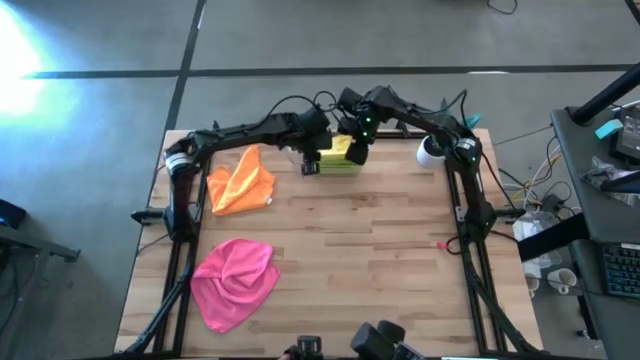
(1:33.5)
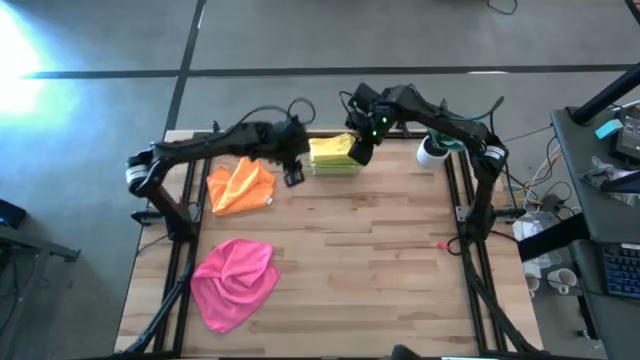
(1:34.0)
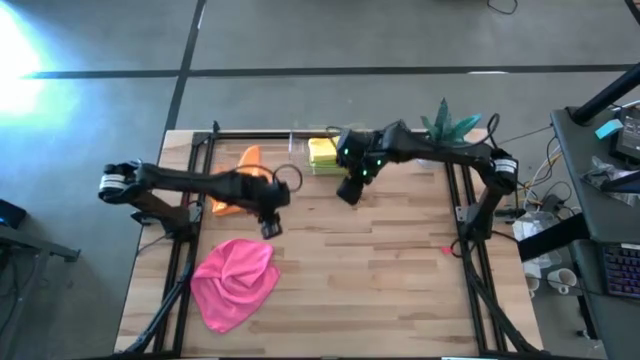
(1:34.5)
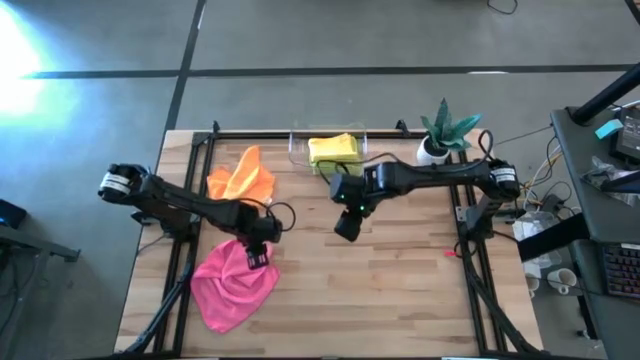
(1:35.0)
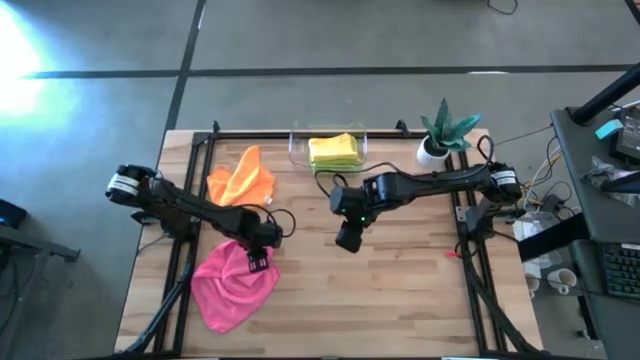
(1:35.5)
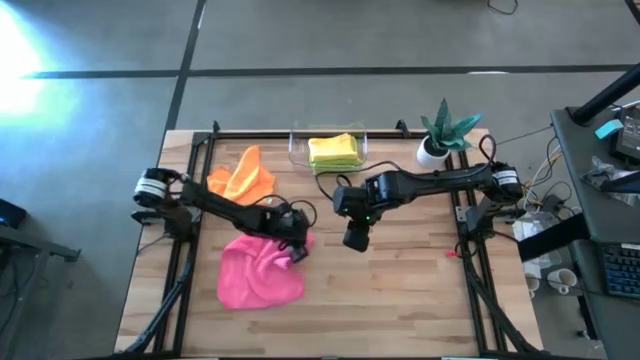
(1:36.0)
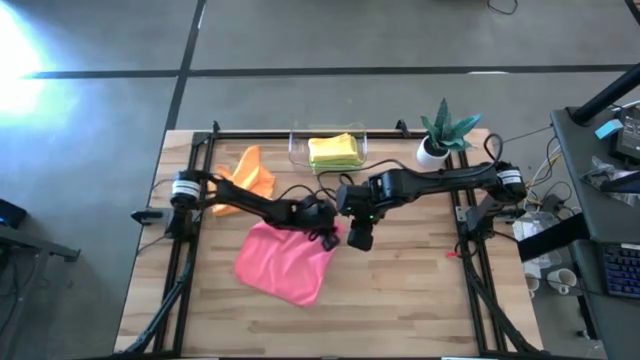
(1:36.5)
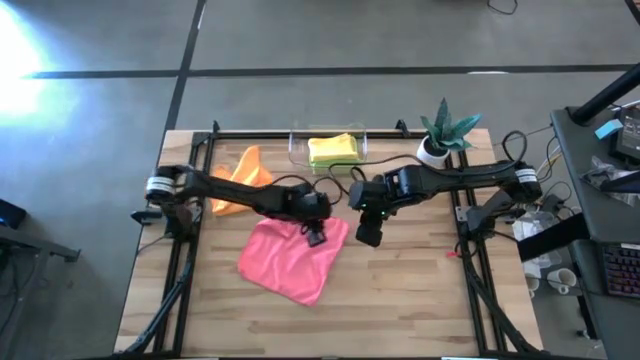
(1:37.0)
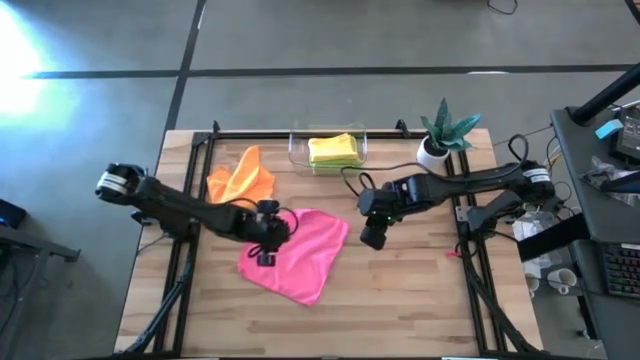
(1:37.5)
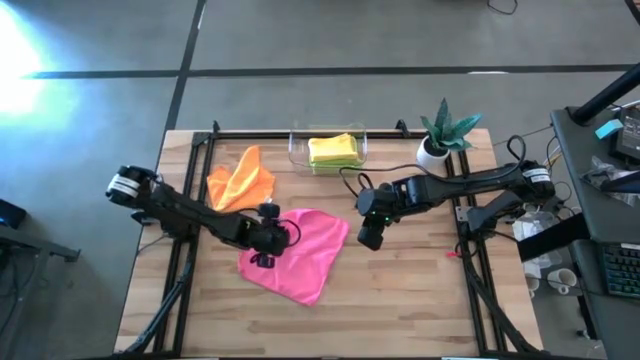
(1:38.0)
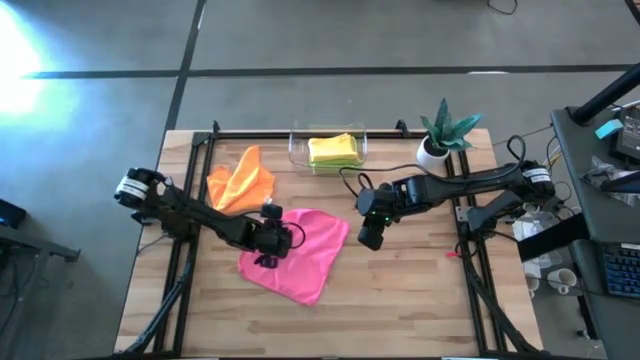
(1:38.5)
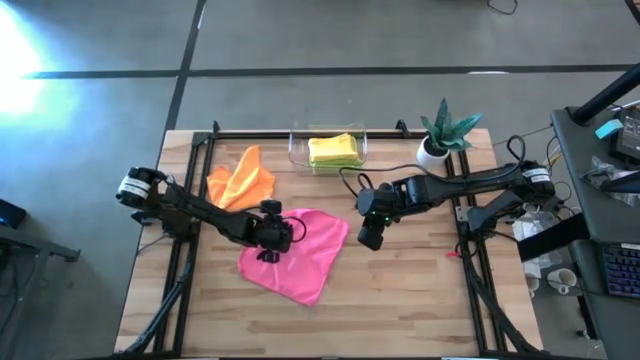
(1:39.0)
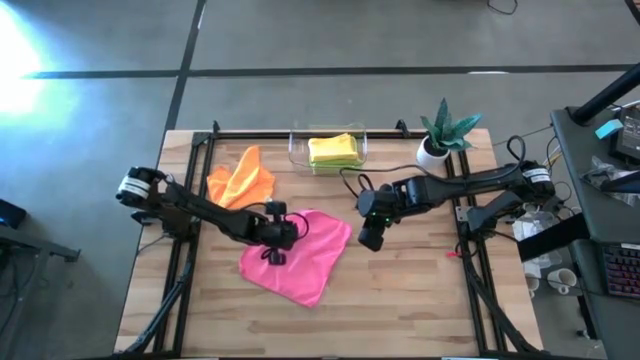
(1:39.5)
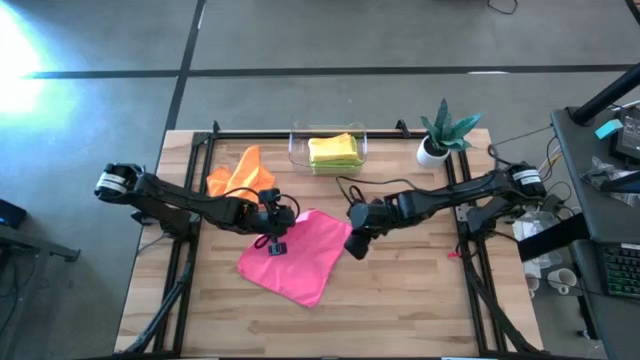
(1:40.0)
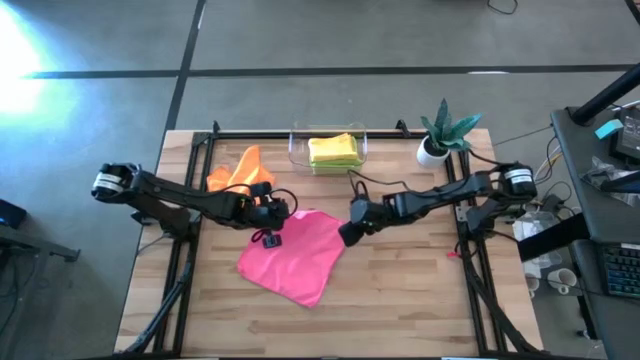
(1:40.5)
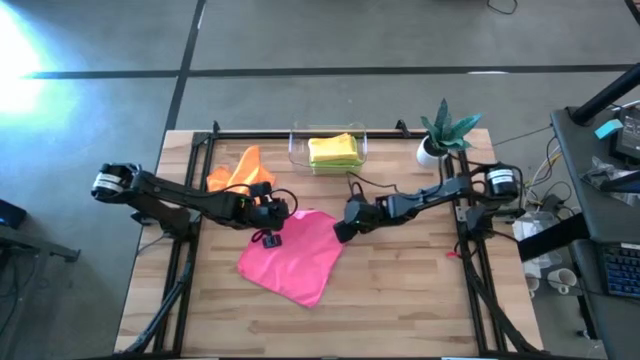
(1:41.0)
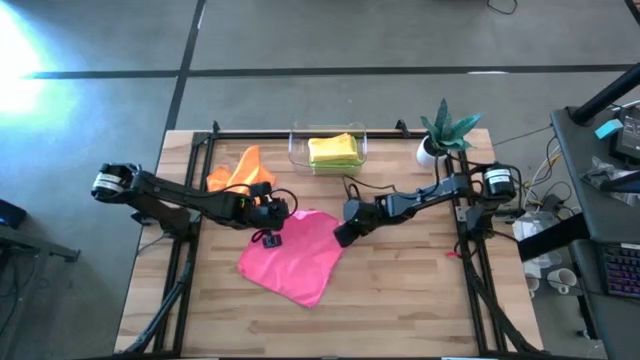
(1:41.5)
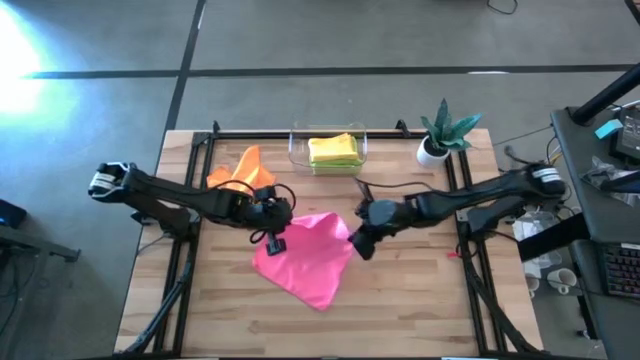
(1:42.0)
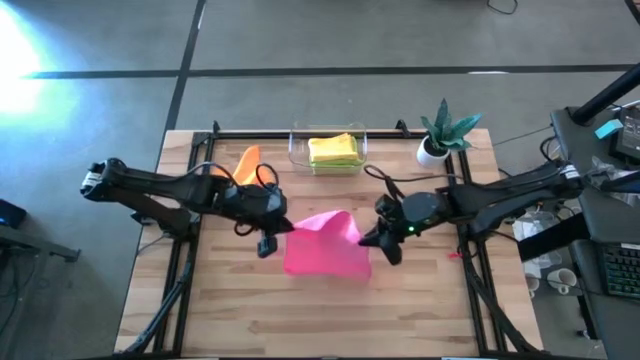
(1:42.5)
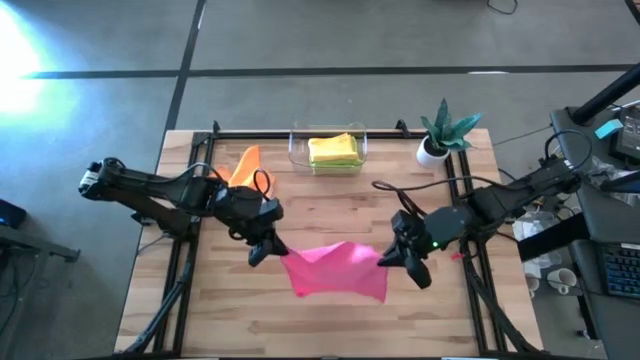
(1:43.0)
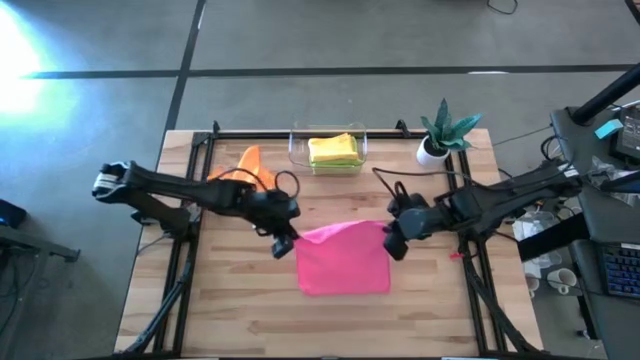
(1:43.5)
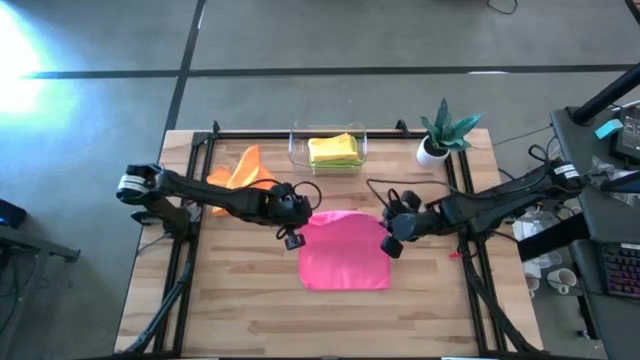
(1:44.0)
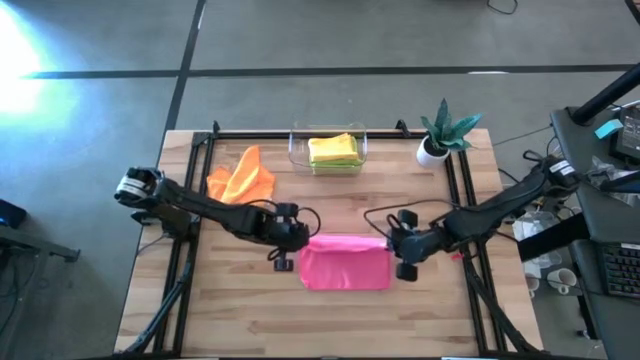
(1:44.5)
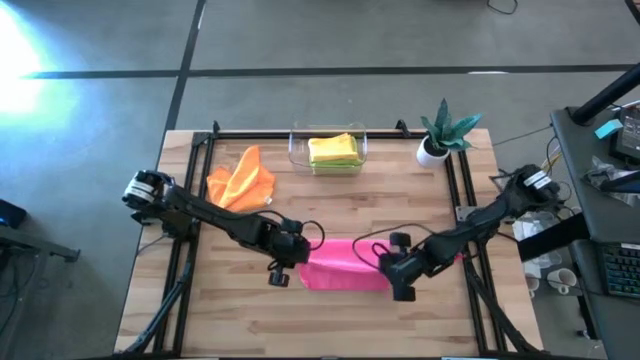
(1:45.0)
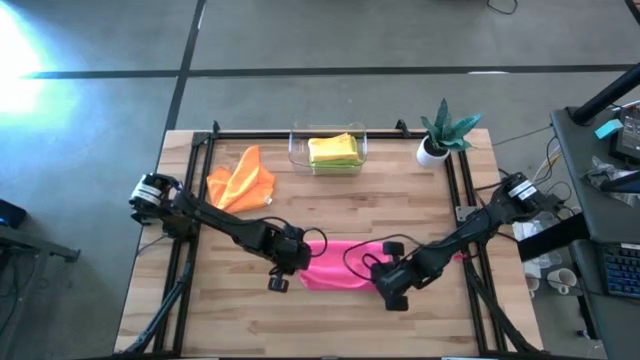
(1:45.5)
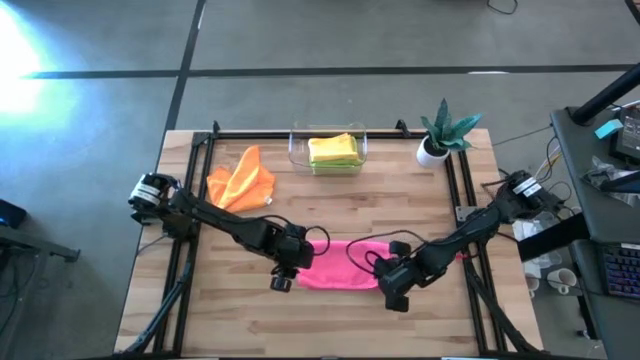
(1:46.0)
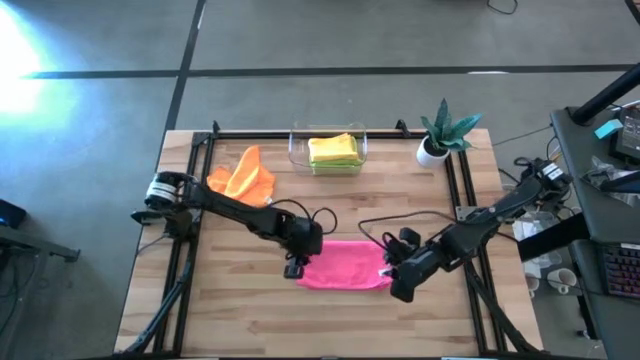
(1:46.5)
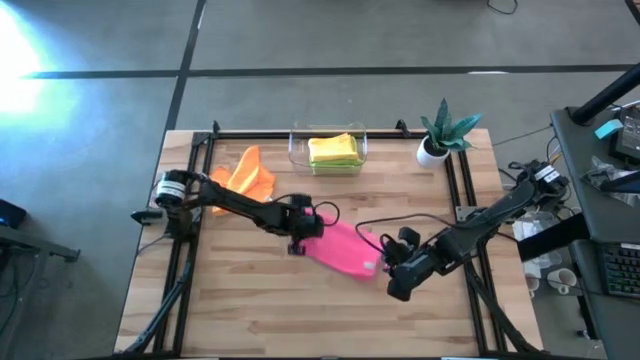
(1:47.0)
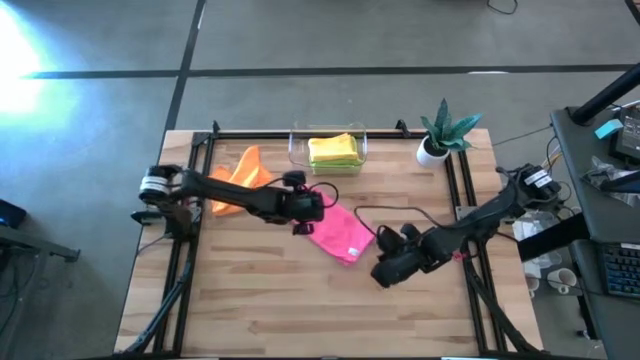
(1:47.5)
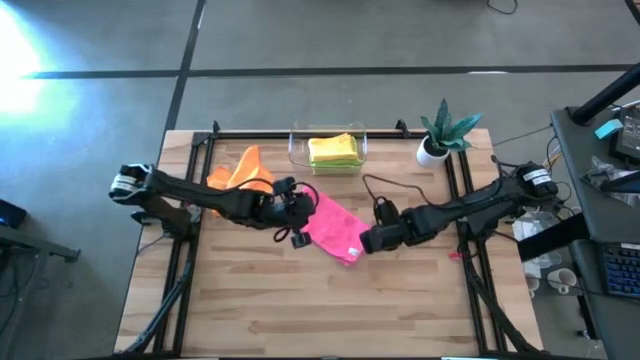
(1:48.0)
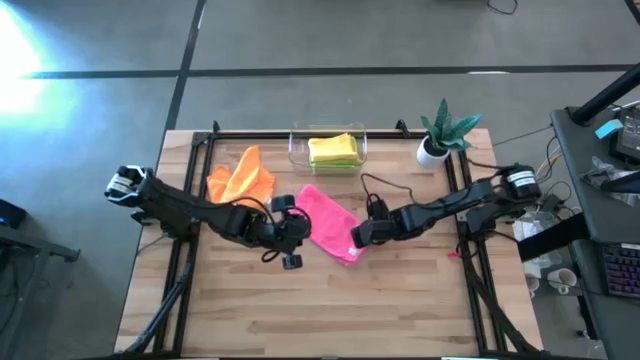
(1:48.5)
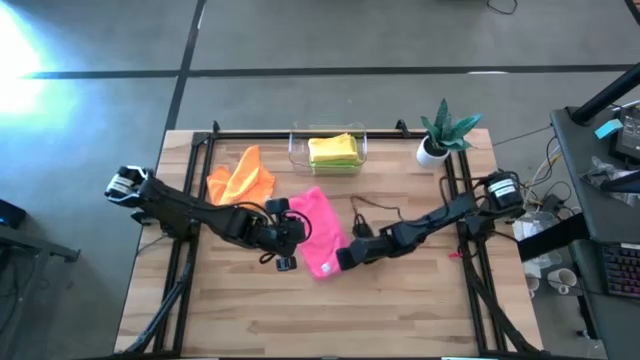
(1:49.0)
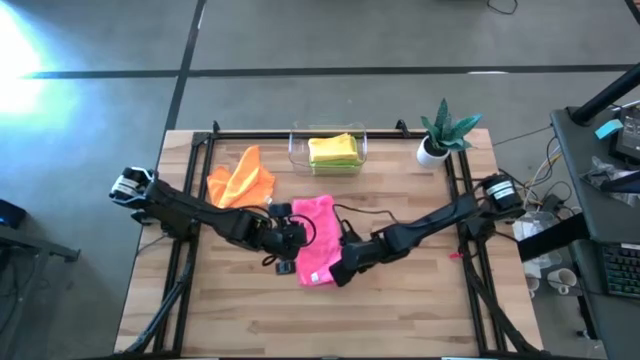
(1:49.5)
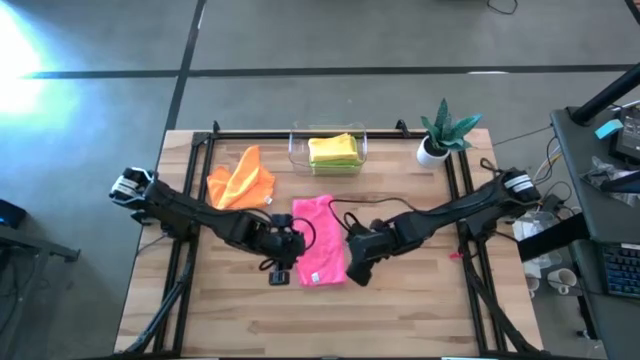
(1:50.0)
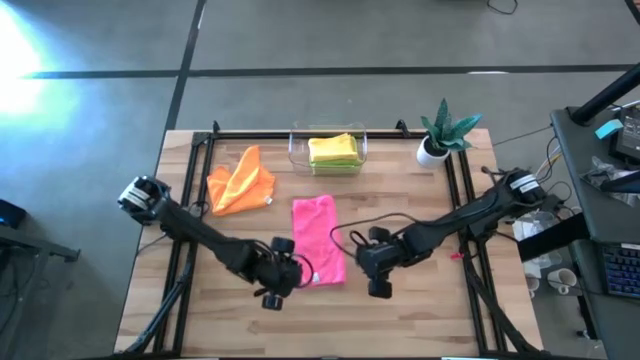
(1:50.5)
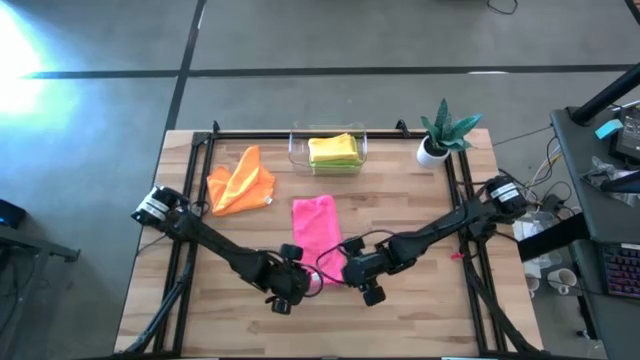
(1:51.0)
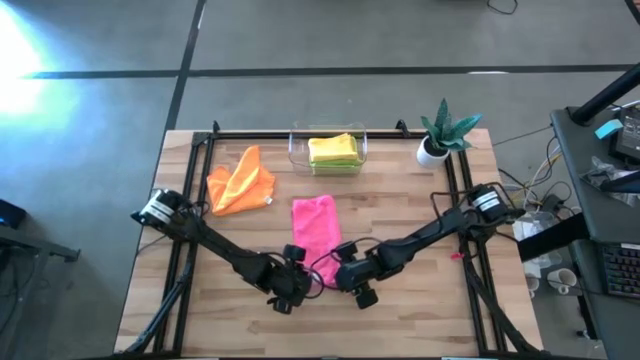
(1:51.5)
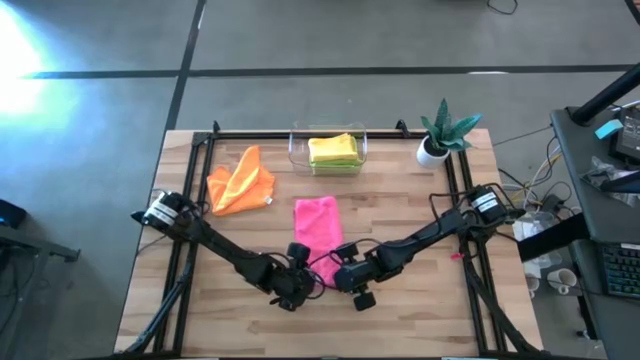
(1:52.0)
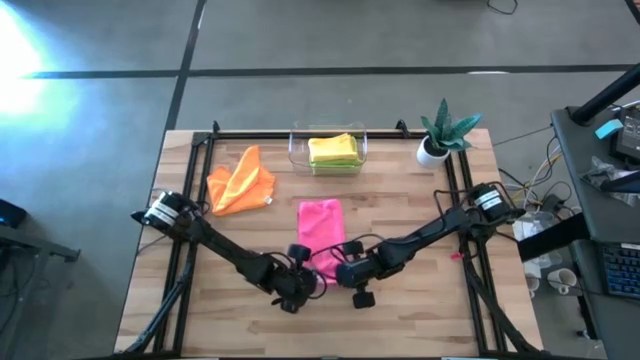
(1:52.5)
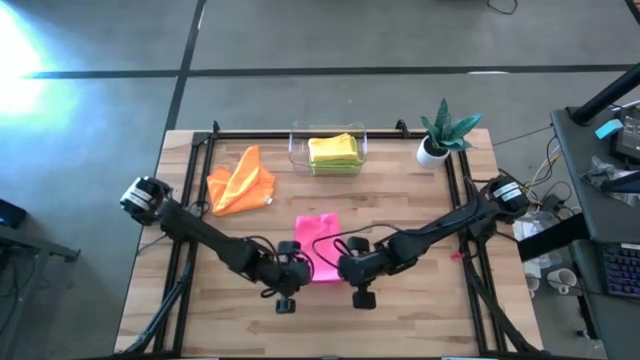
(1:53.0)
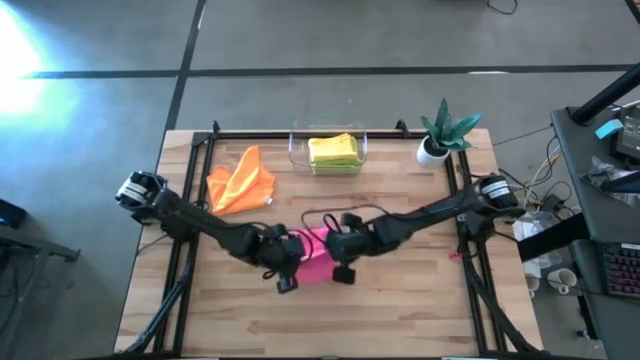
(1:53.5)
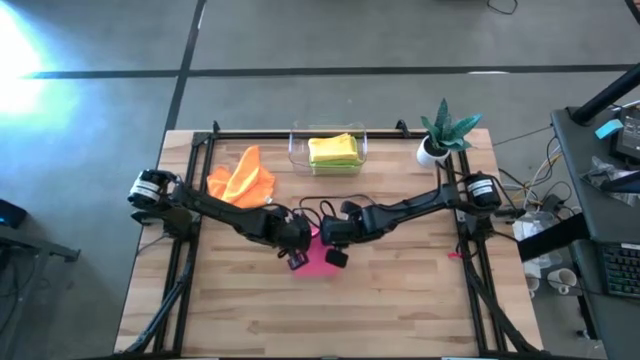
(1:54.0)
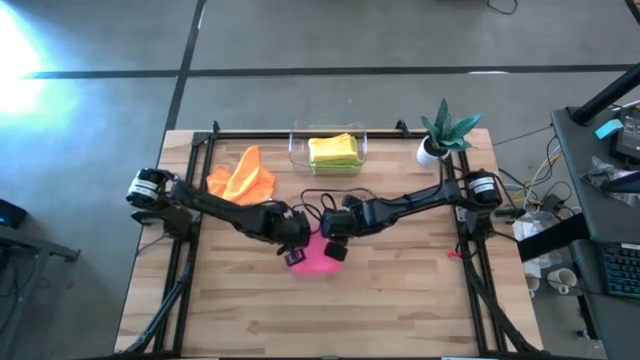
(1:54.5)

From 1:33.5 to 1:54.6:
Task: Fold microfiber towels
Fold the pink microfiber towel on the table

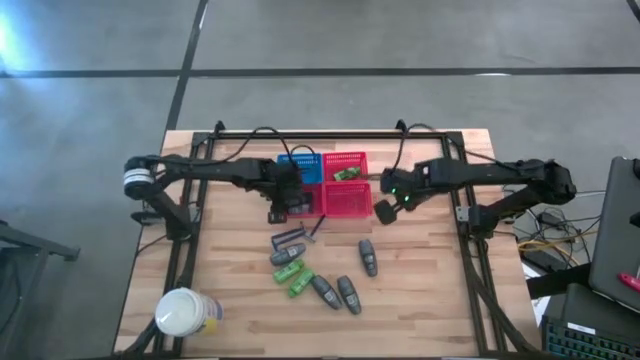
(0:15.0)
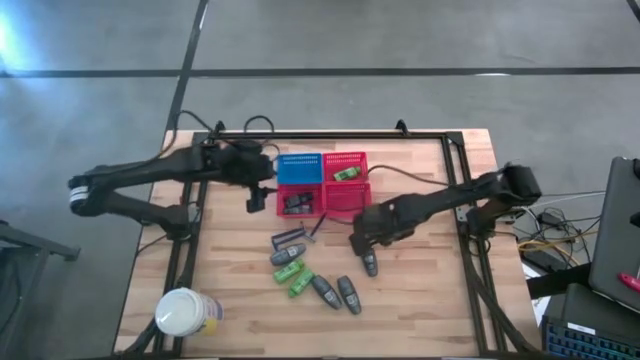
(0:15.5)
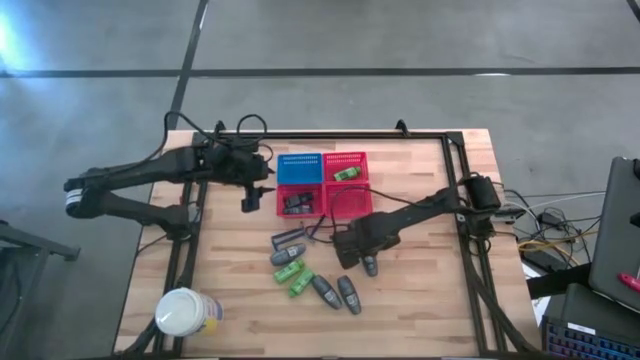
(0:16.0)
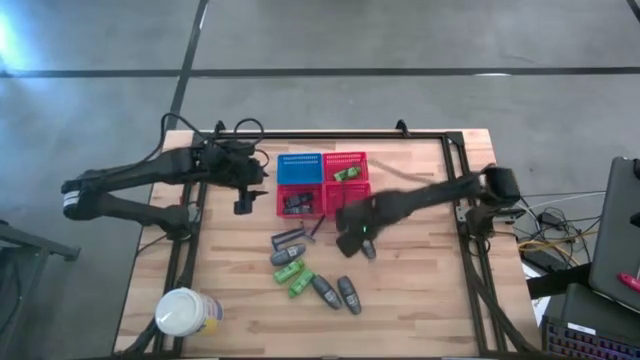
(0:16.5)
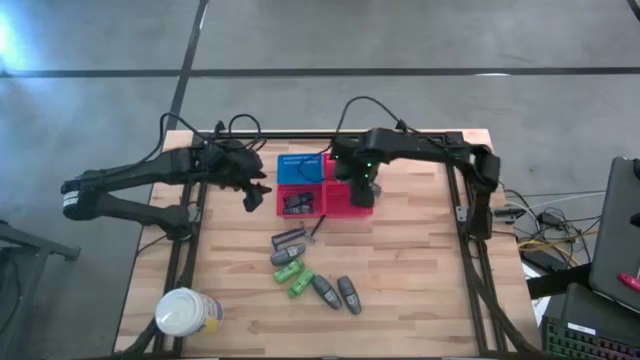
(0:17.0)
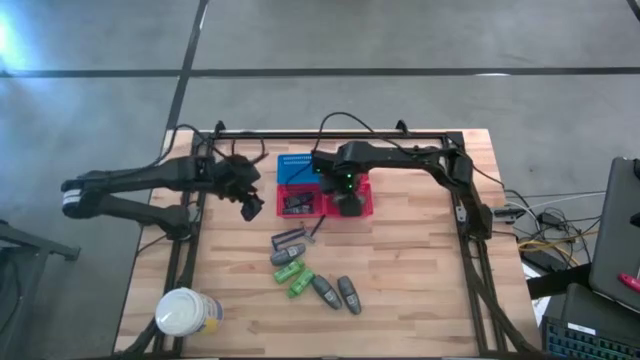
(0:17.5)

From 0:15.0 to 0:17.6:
Task: Pick & Place Travel size toiletries
Put the deodorant into the bottom right red bin
